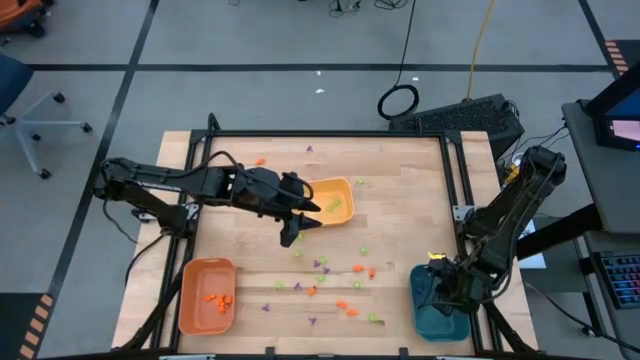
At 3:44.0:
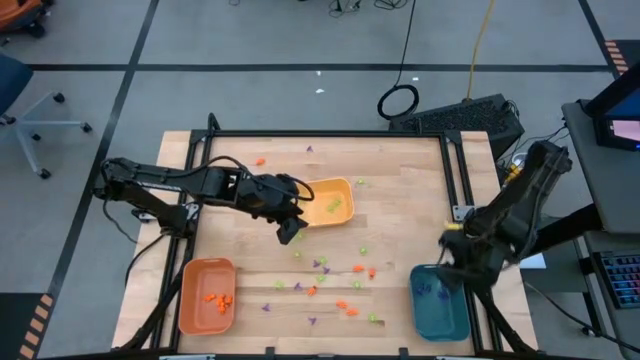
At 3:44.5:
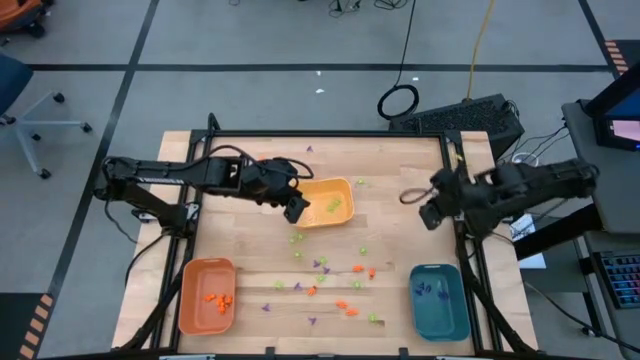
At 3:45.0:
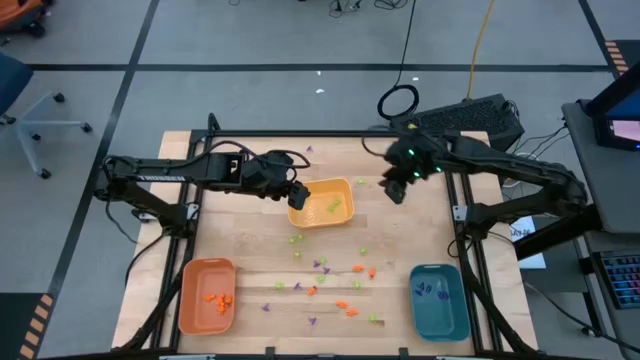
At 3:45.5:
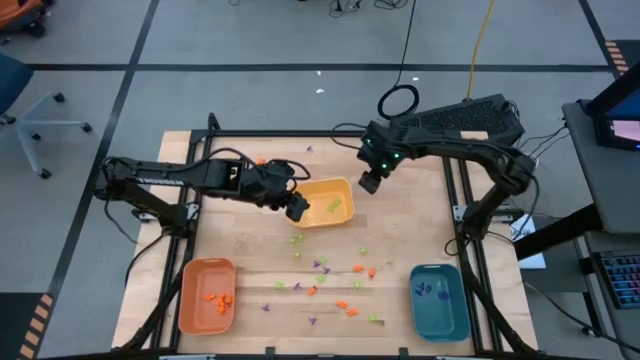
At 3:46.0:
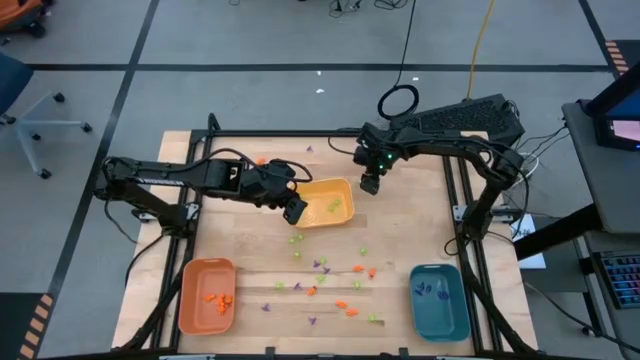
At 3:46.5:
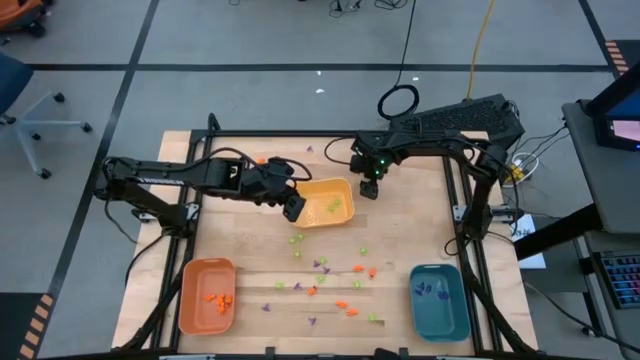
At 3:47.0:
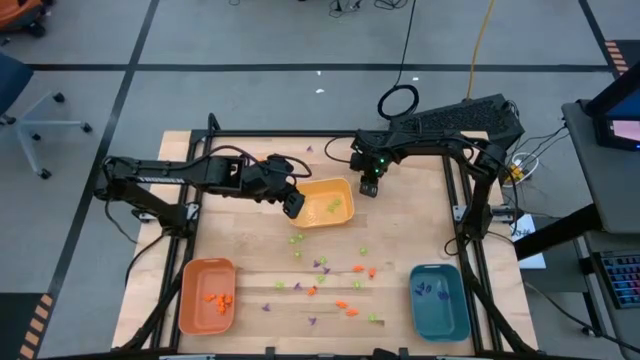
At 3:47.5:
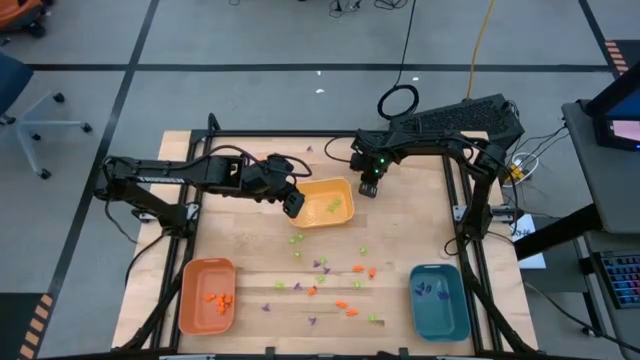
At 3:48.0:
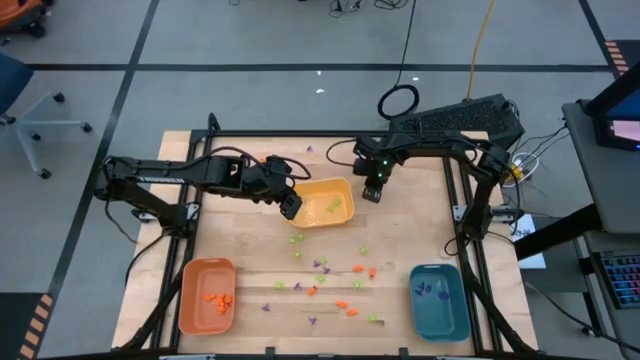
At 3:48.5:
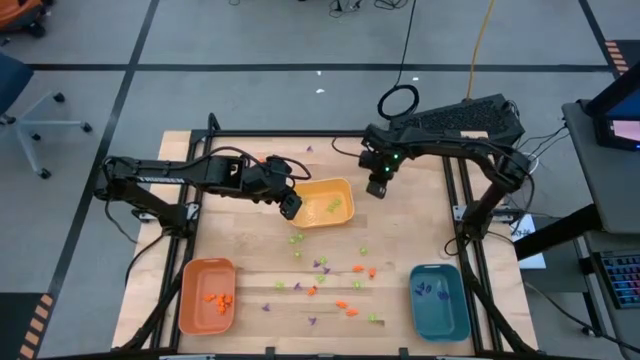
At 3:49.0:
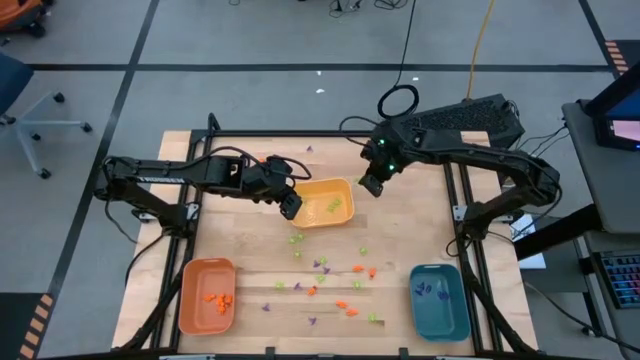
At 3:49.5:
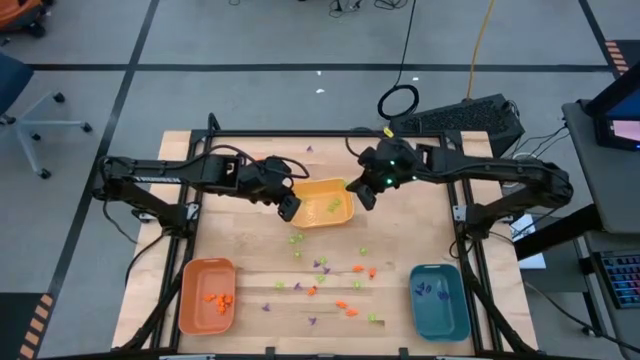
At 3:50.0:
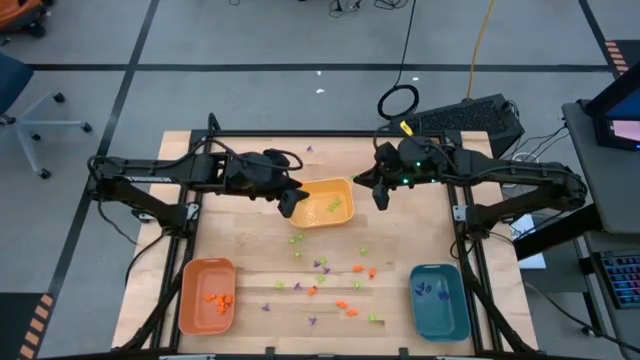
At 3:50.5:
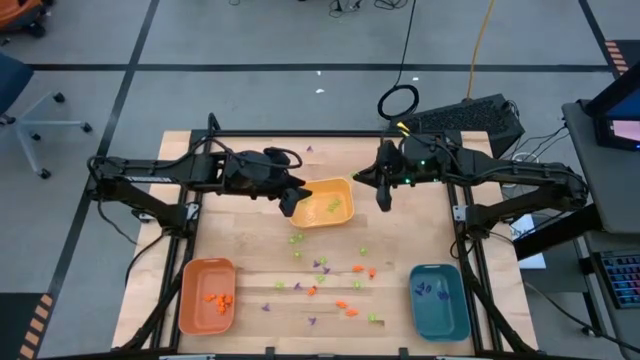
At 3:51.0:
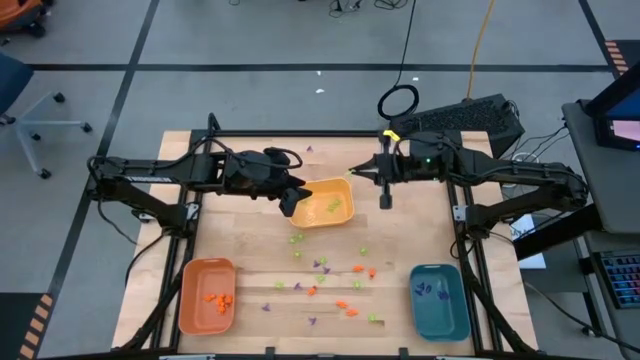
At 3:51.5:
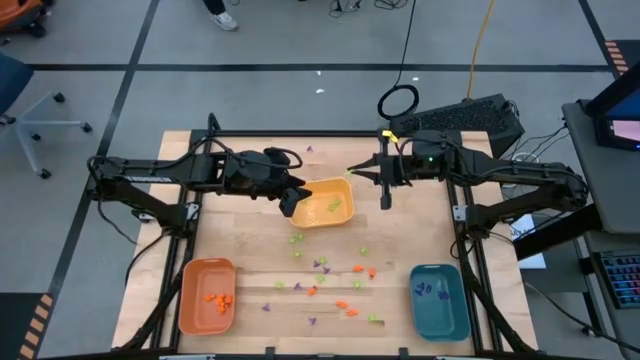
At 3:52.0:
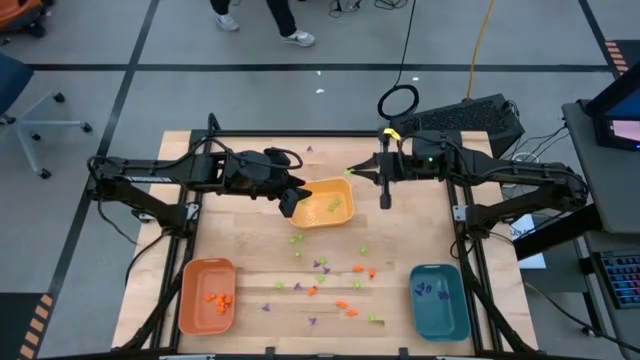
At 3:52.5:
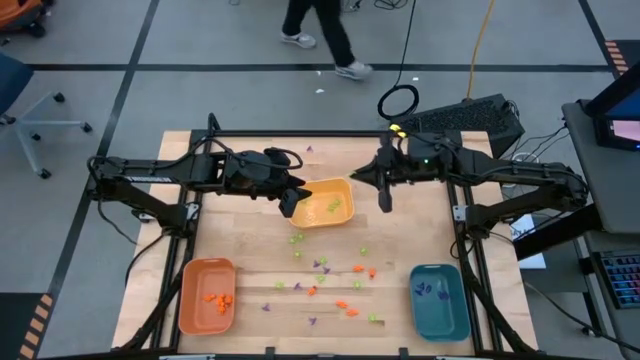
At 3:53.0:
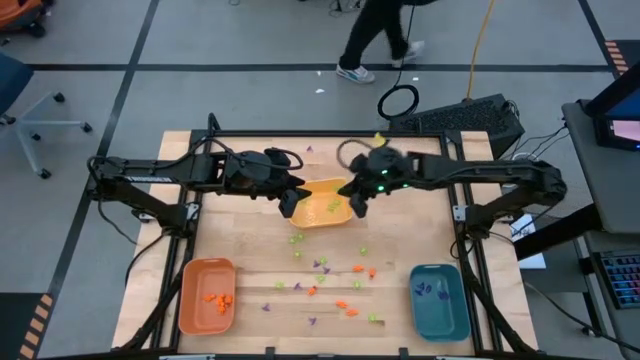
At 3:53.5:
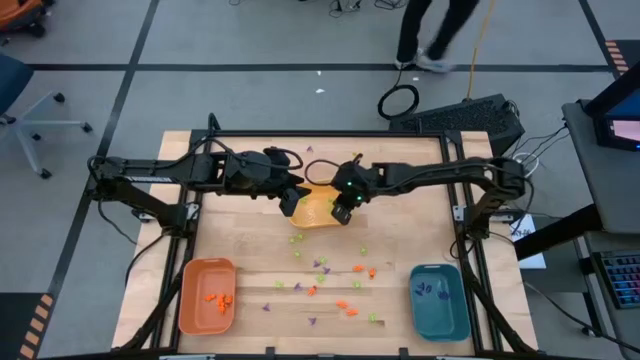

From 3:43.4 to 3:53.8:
Task: Sort Halloween decoration
Put the green spider toy into the yellow bin

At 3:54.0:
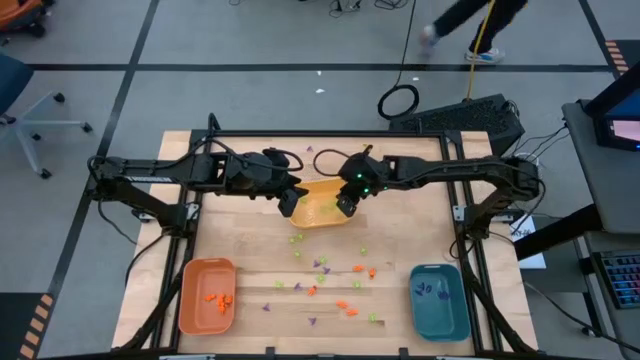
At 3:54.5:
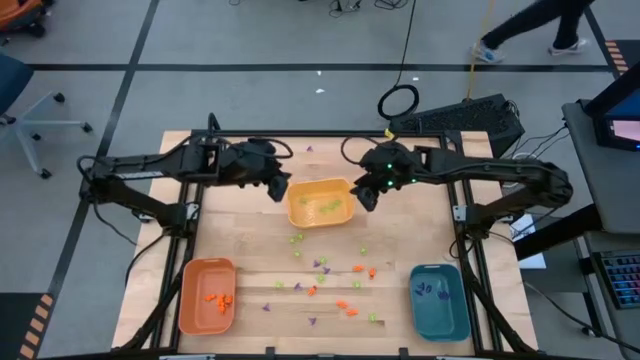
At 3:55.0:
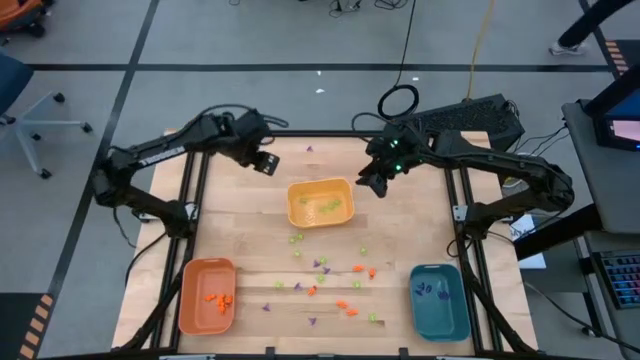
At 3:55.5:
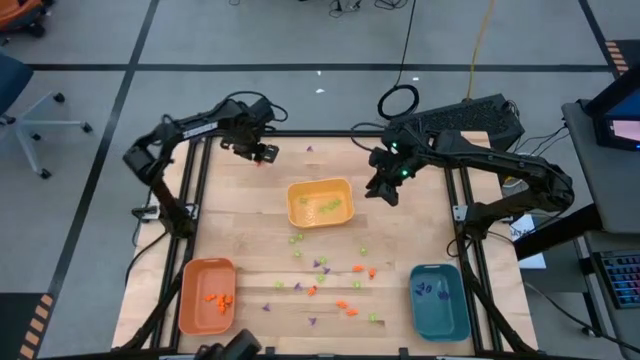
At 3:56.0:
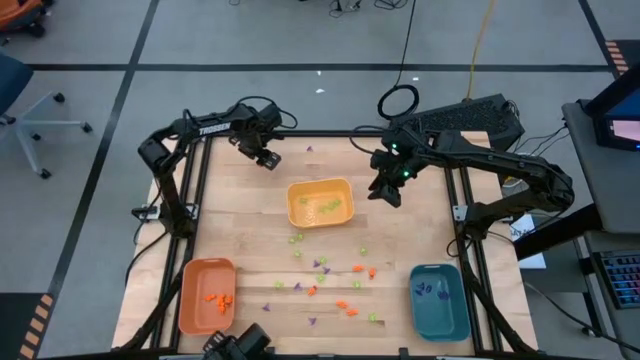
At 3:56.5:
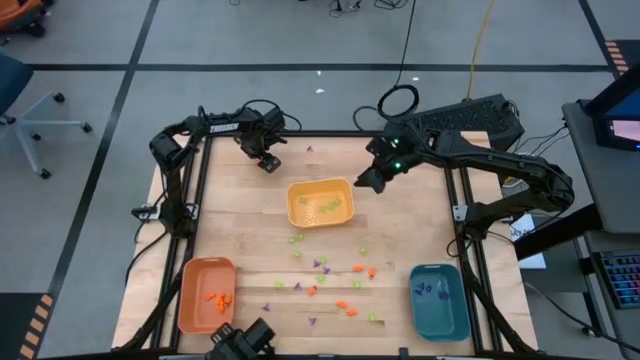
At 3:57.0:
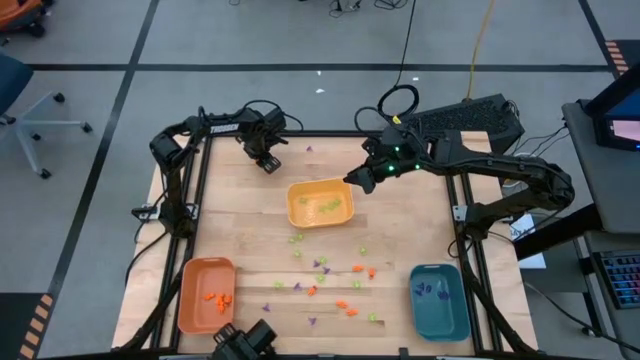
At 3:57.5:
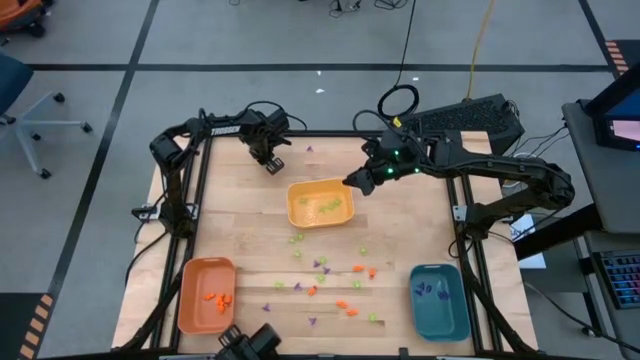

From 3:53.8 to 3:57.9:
Put the orange skeleton toy into the orange bin

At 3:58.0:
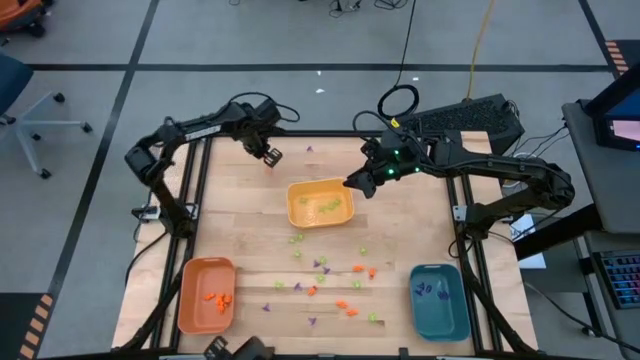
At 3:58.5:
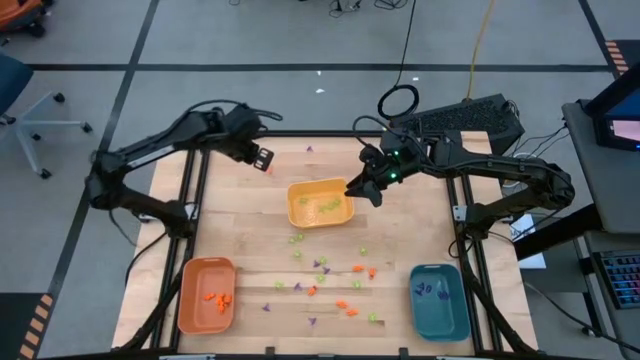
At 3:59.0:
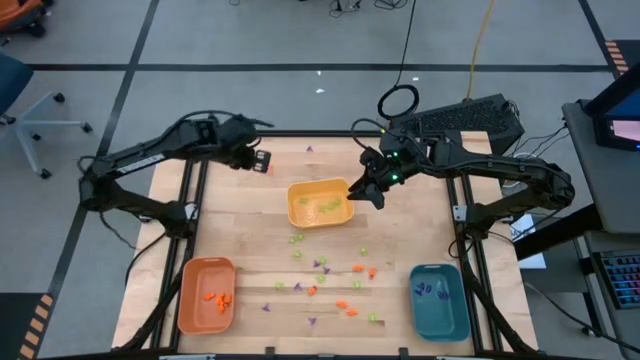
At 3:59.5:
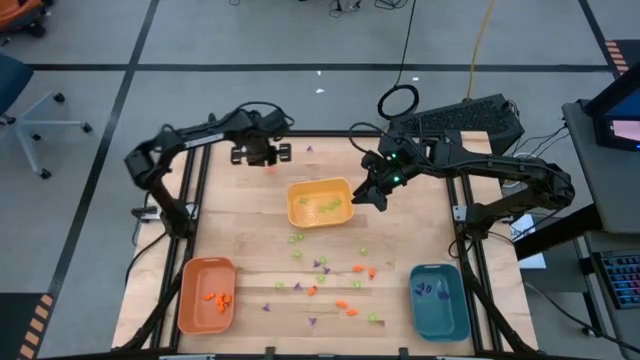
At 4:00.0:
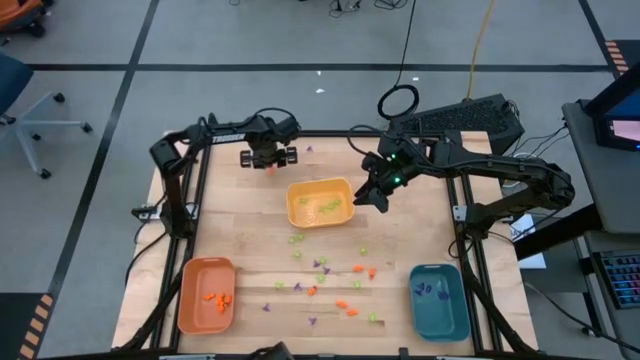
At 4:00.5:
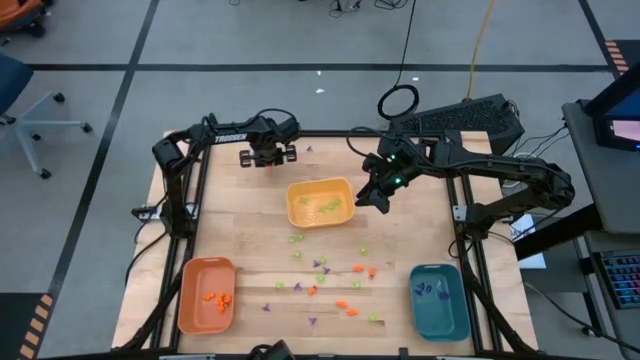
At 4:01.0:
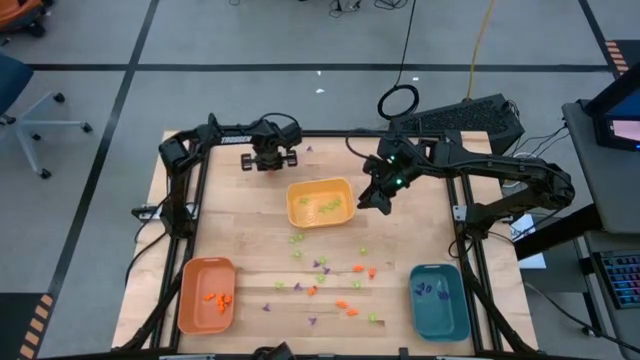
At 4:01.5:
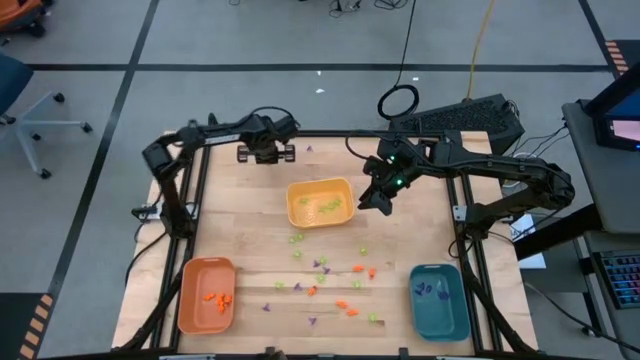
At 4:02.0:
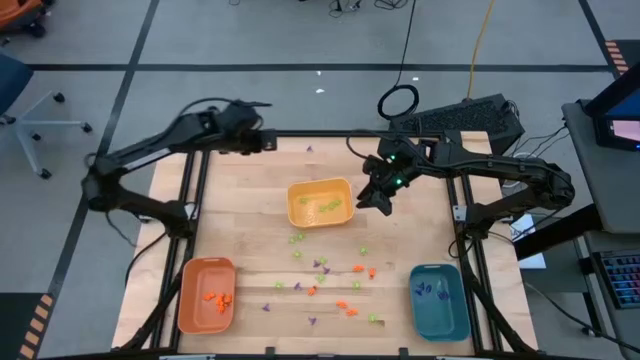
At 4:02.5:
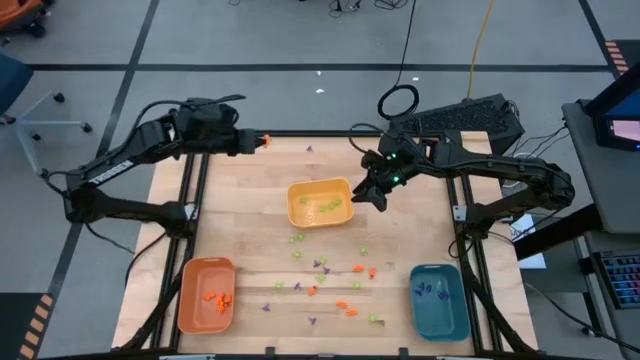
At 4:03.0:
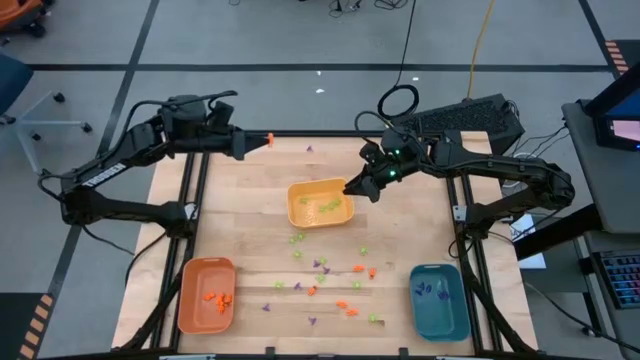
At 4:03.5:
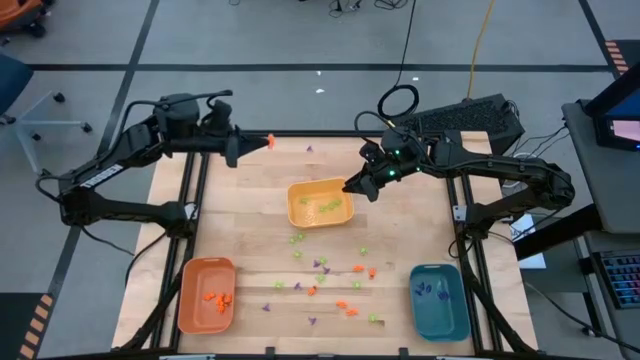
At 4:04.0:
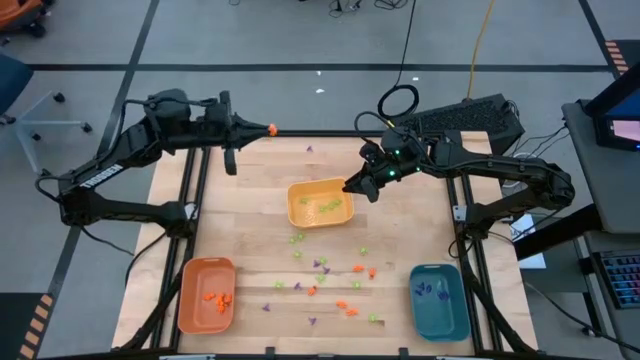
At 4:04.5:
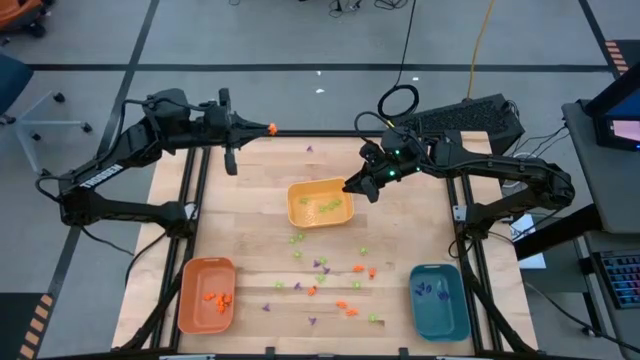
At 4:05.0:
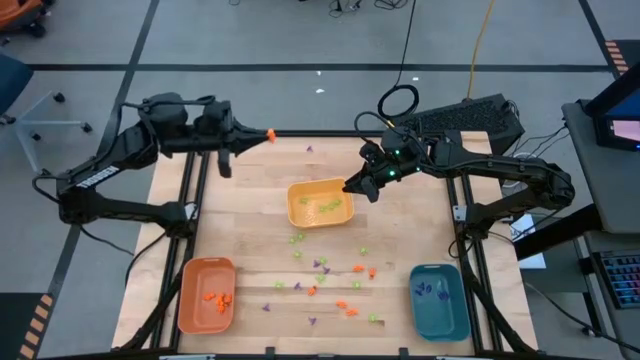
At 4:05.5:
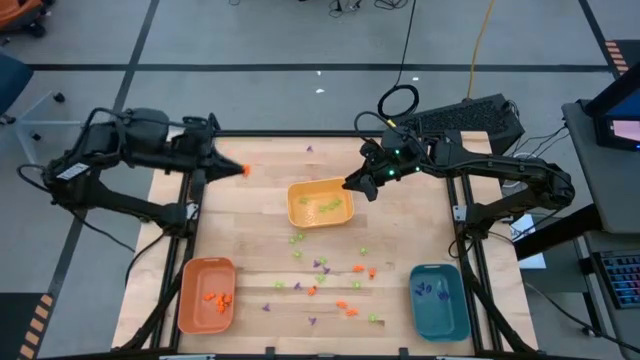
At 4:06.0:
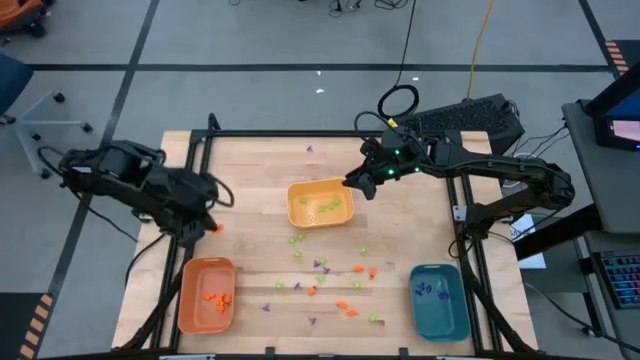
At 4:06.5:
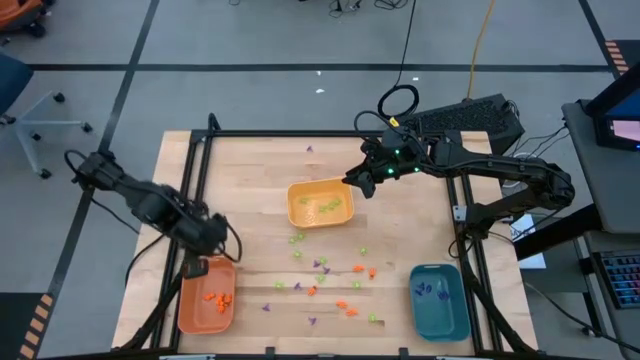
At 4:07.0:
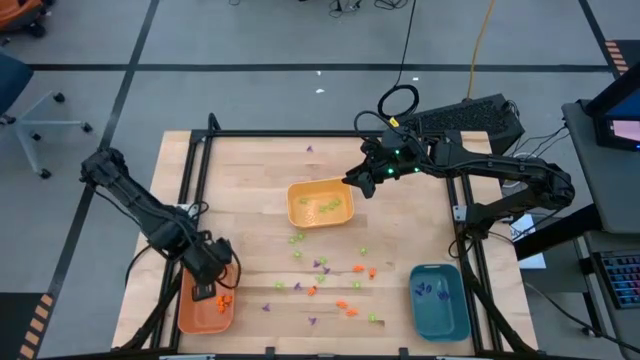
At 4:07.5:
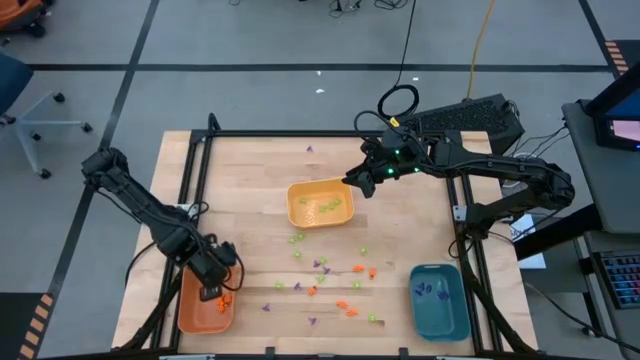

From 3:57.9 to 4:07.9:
Put the orange skeleton toy into the orange bin
